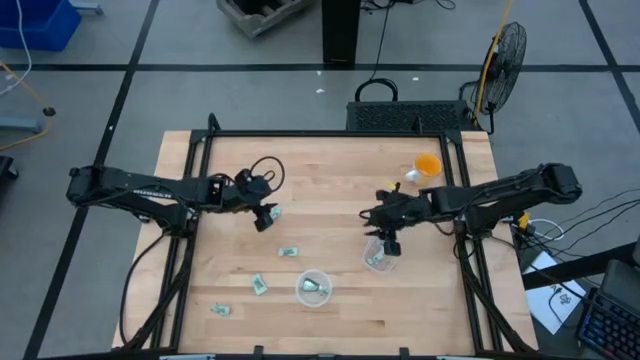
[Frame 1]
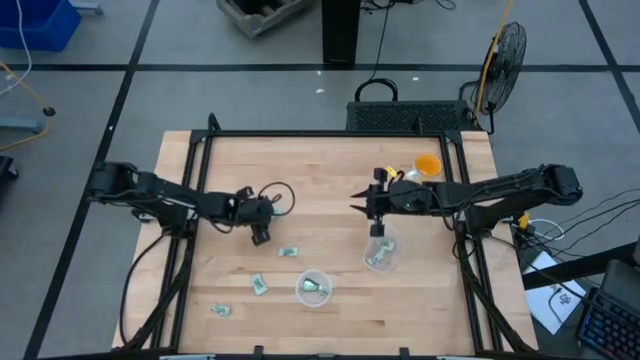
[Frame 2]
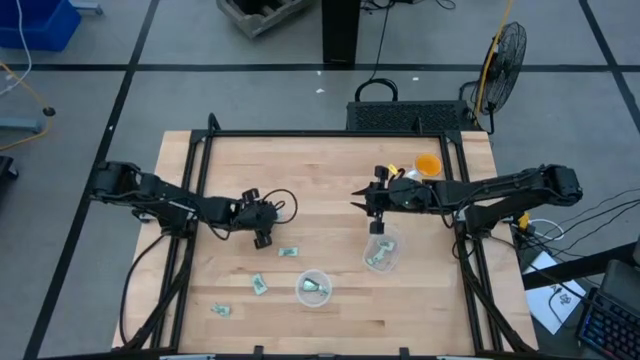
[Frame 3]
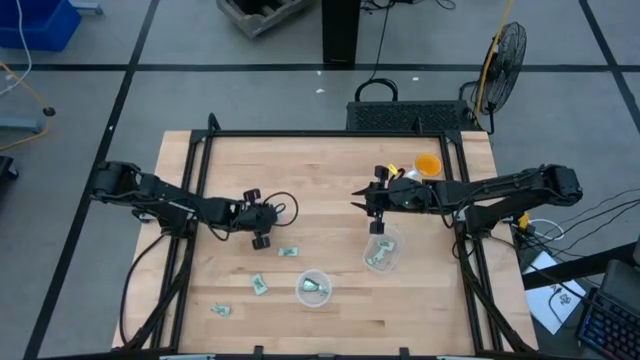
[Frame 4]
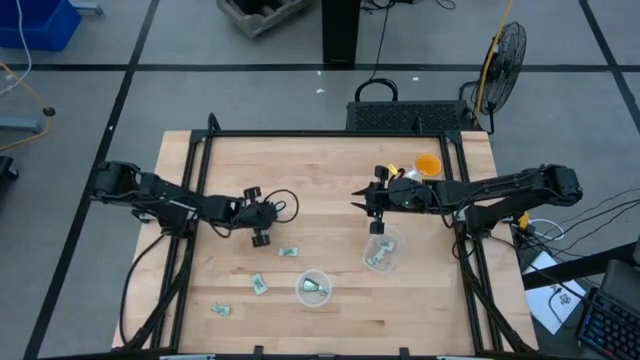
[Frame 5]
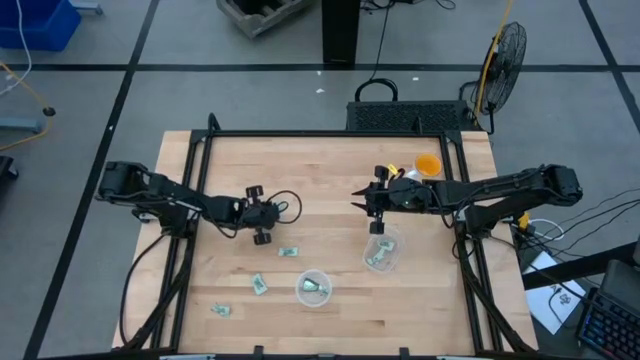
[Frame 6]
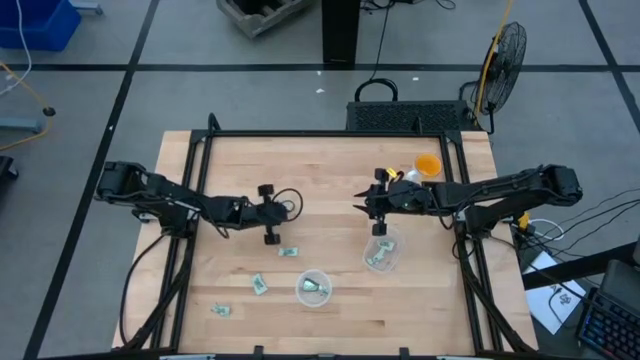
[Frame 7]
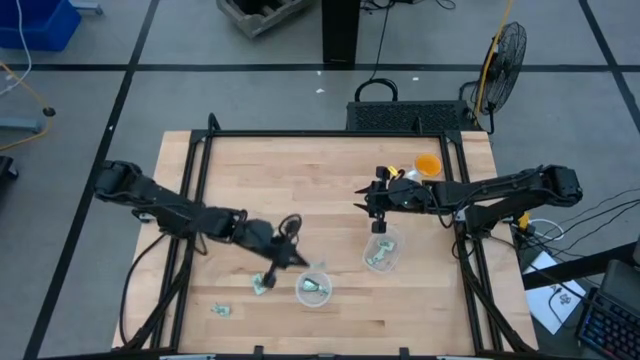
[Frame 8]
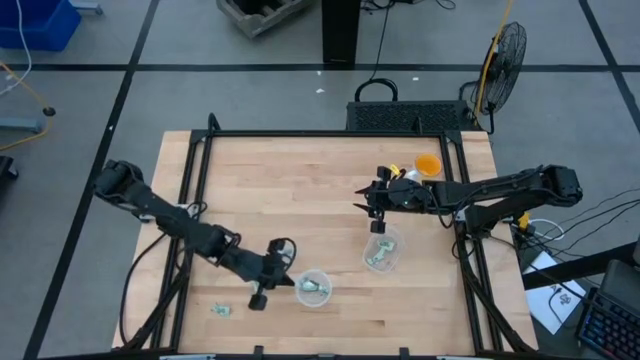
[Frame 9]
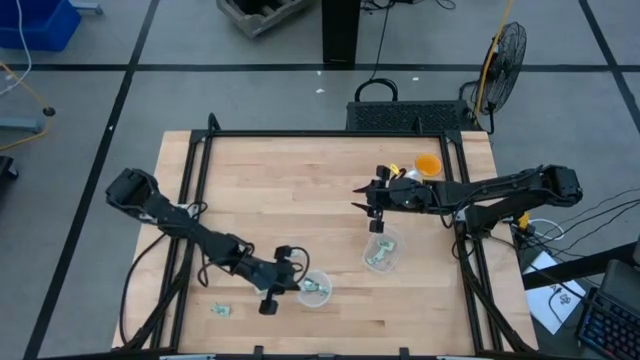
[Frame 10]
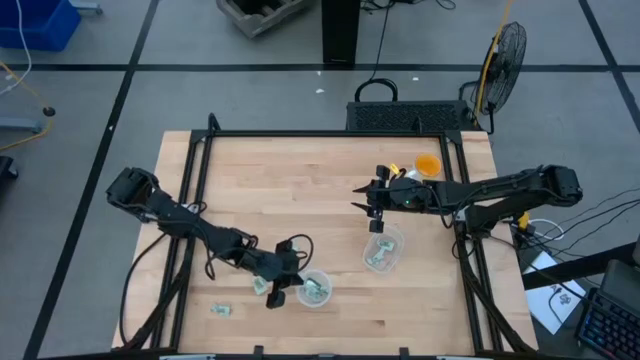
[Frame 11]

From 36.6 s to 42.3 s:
Task: Pick and place items into bin
Put the Stevia packet into the left transparent bin

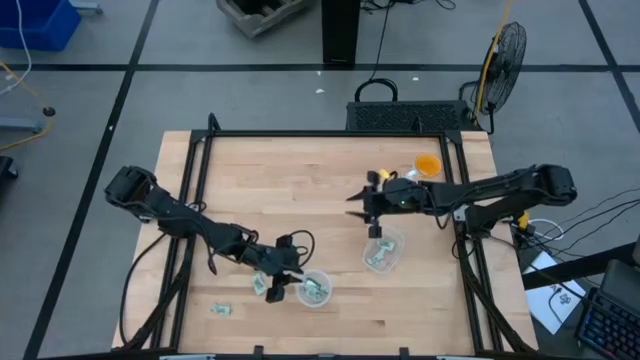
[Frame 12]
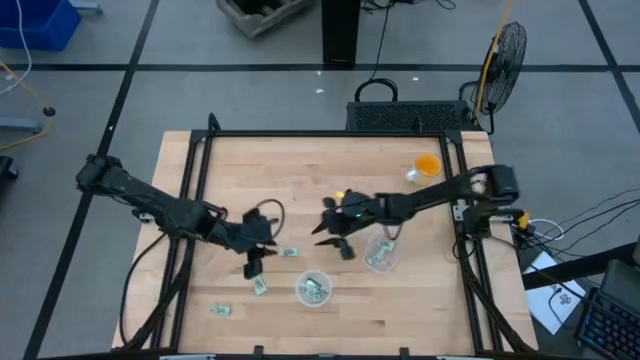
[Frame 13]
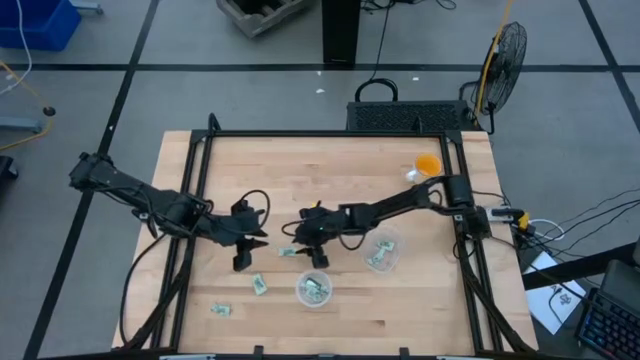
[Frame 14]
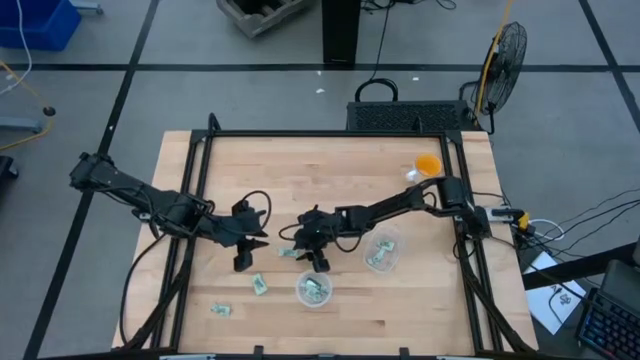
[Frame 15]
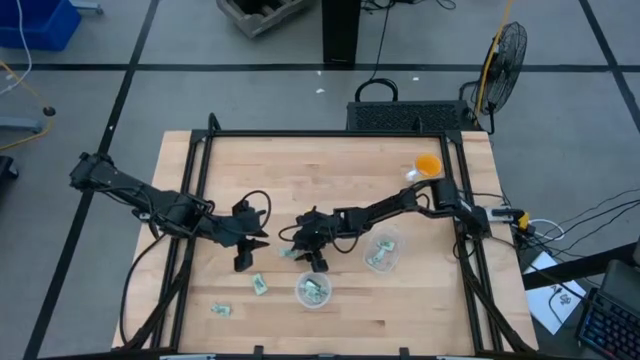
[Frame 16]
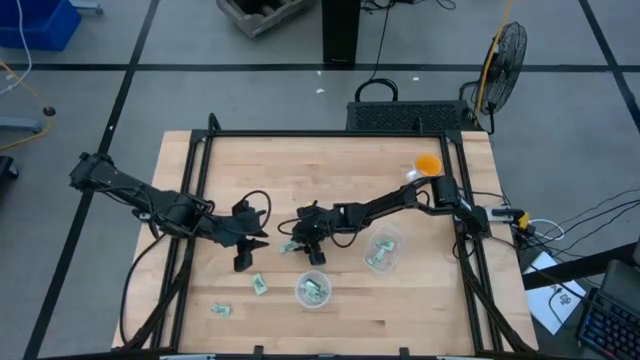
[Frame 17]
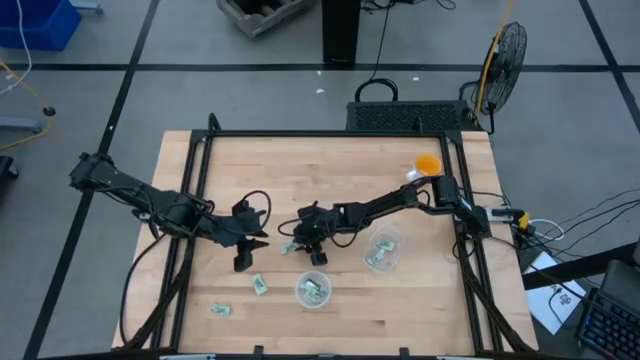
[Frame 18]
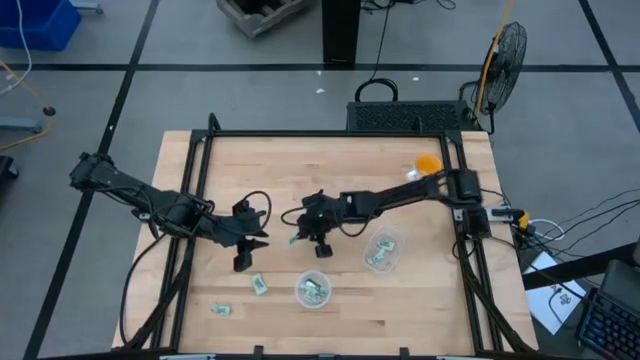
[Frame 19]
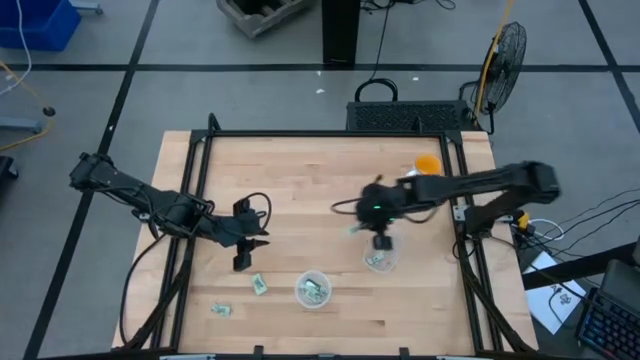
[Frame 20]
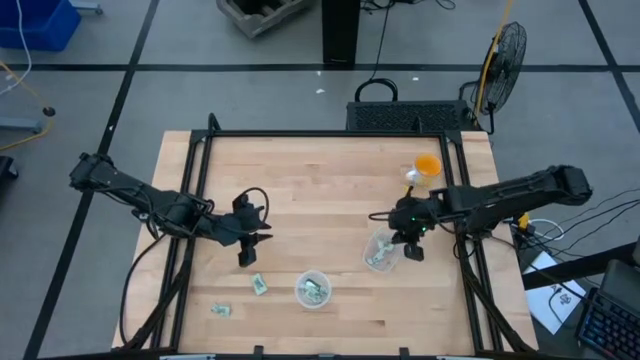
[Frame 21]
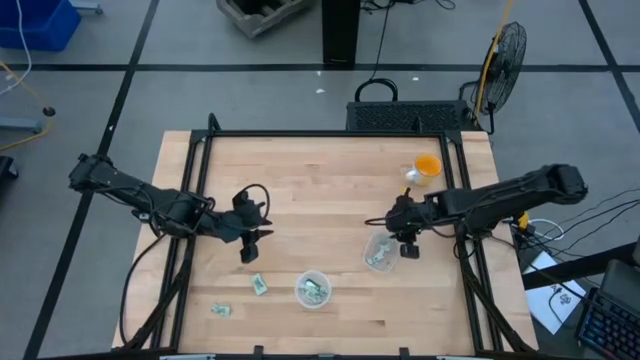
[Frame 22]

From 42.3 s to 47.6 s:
Put the Stevia packet into the right transparent bin

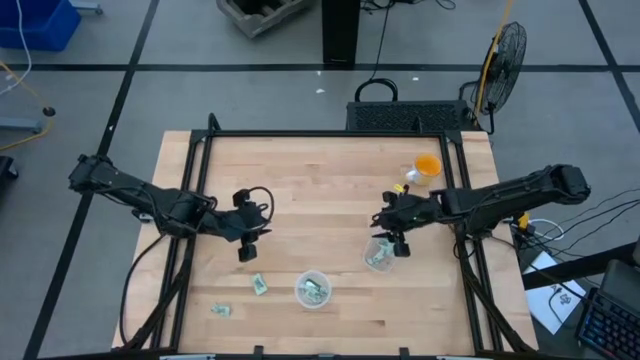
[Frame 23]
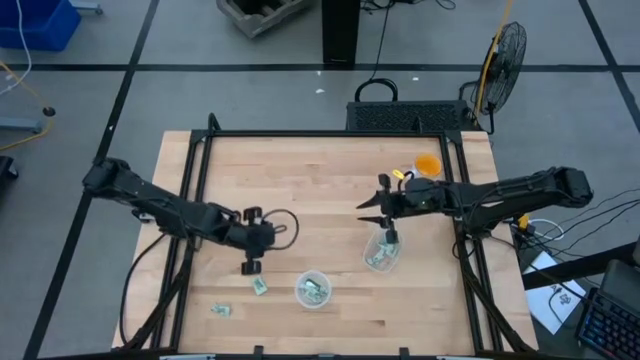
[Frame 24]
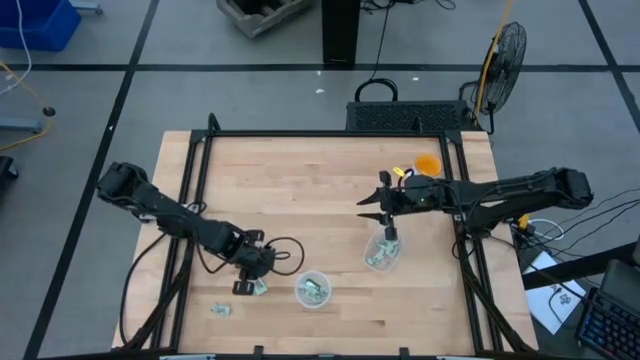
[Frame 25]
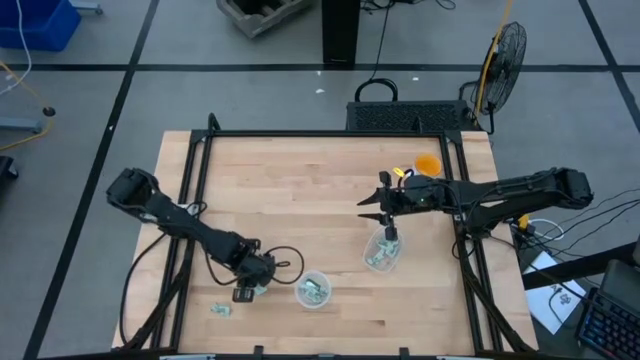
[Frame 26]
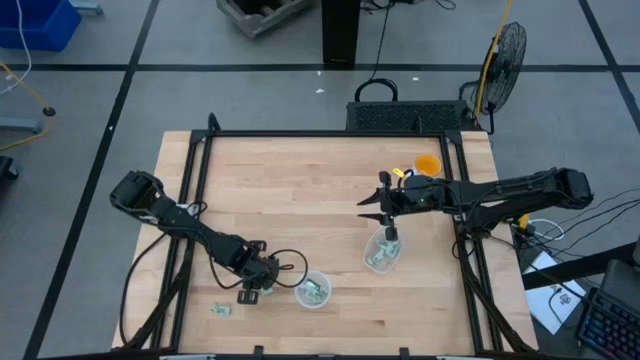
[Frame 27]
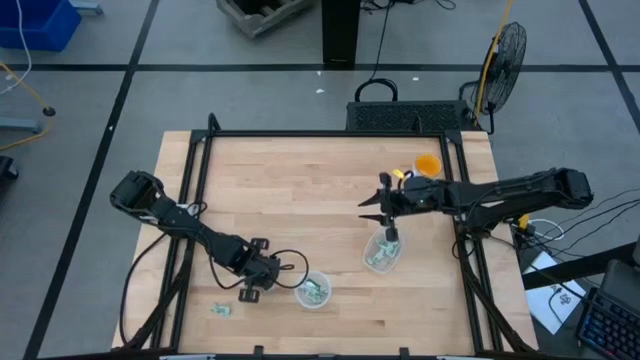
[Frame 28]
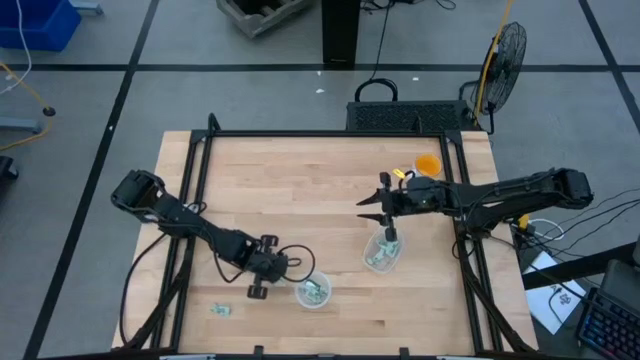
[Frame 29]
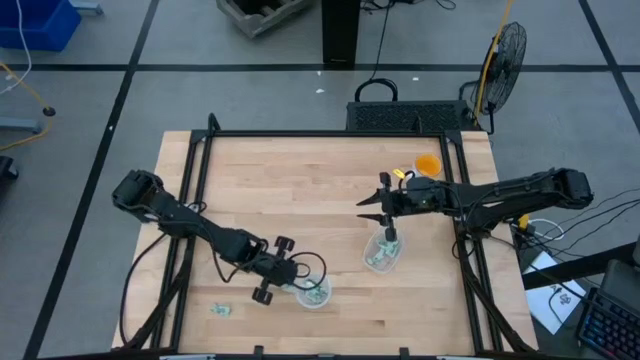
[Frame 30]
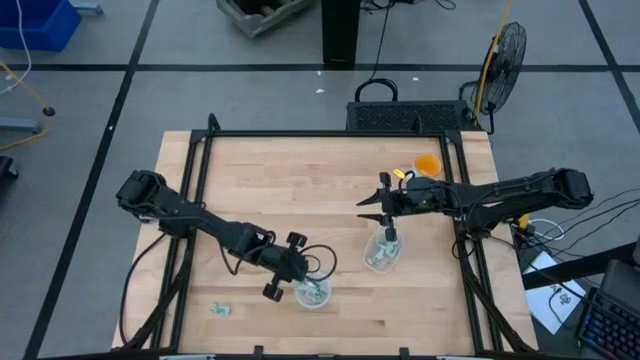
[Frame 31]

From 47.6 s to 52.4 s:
Put the Stevia packet into the left transparent bin

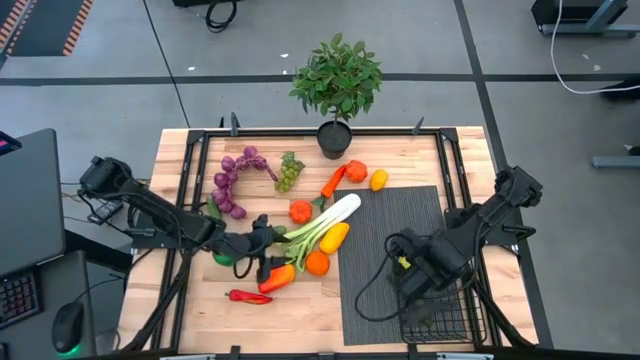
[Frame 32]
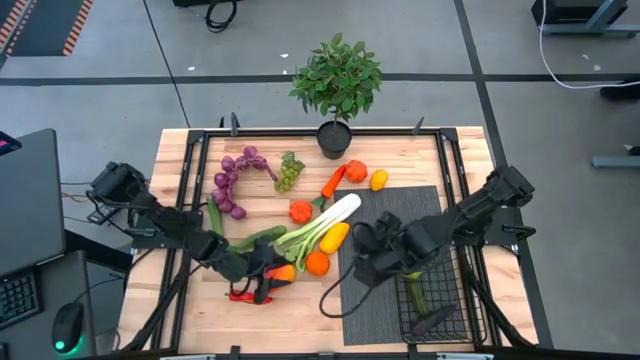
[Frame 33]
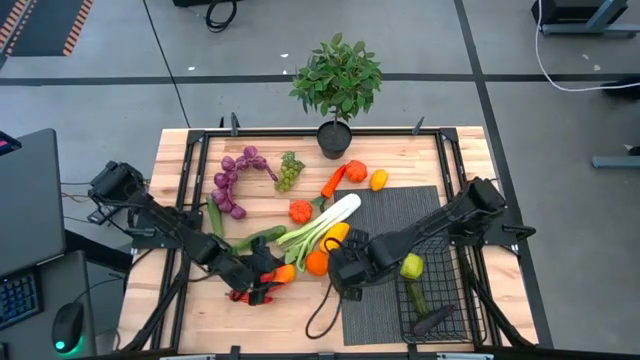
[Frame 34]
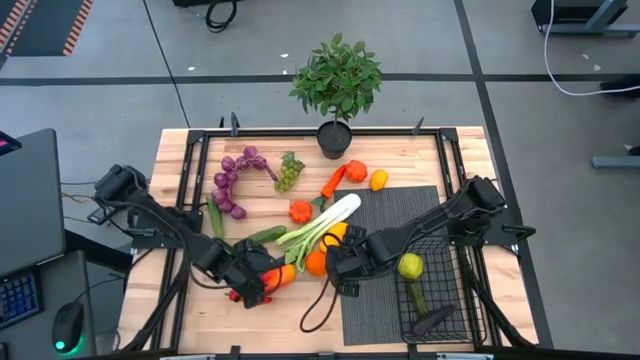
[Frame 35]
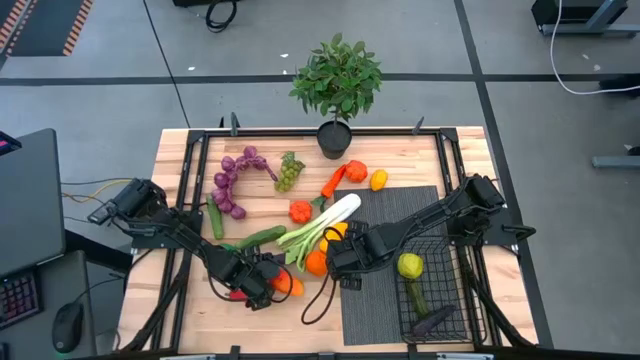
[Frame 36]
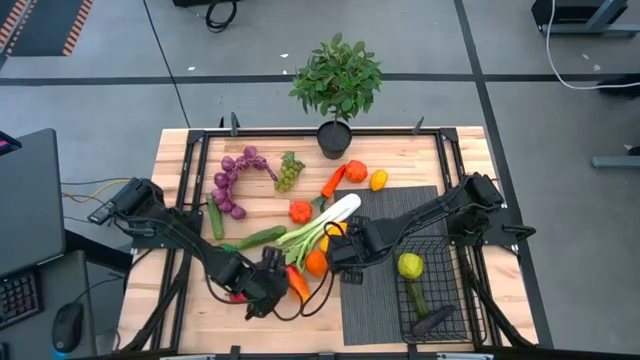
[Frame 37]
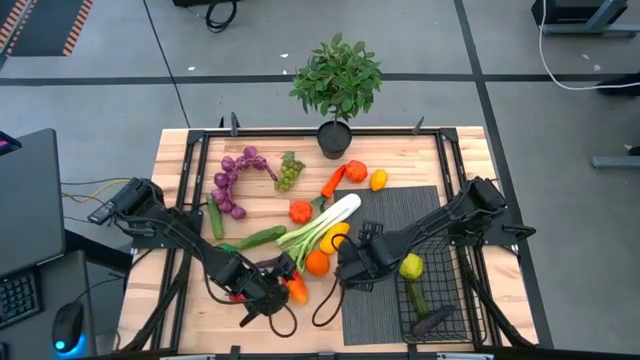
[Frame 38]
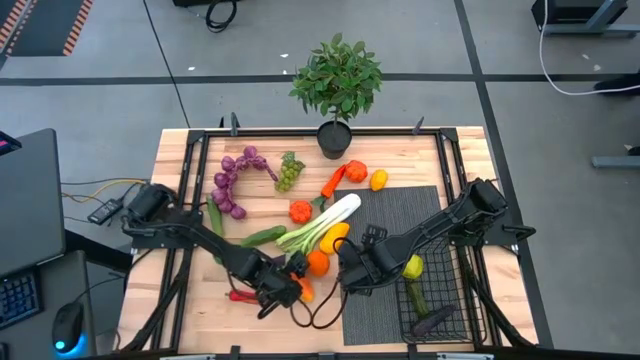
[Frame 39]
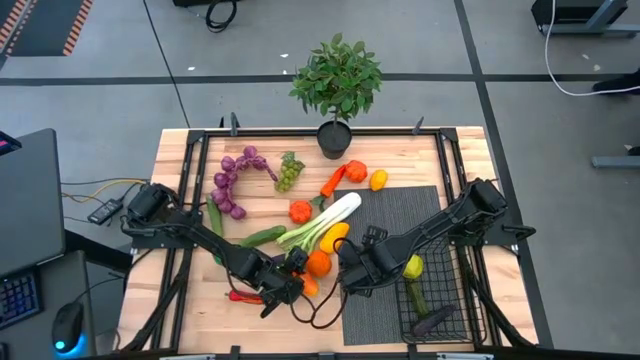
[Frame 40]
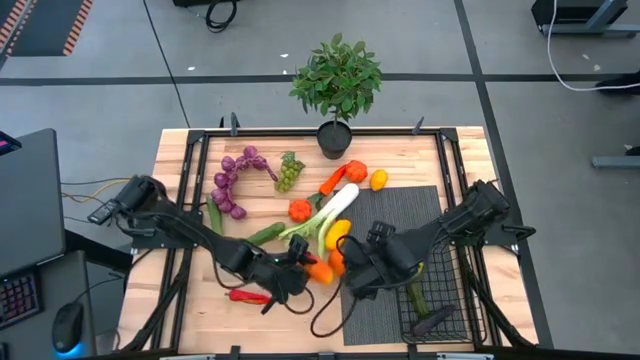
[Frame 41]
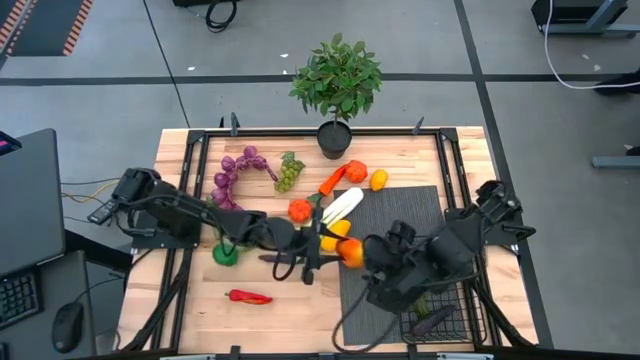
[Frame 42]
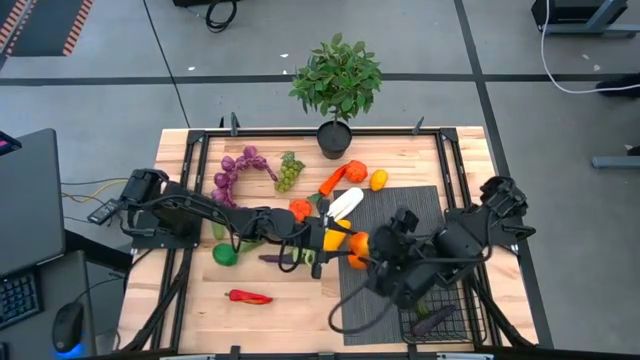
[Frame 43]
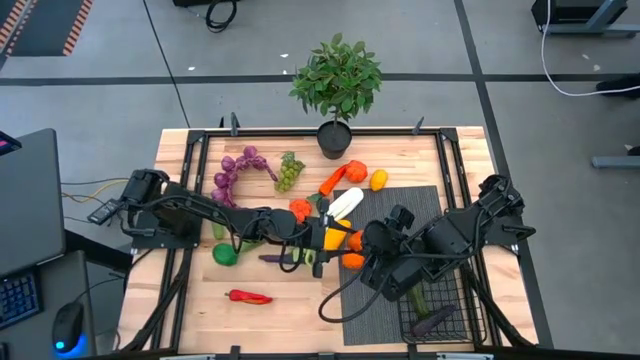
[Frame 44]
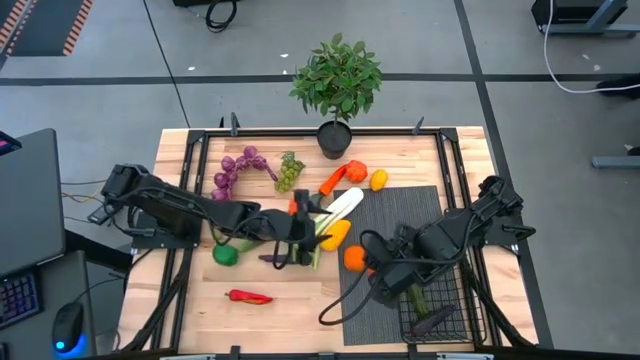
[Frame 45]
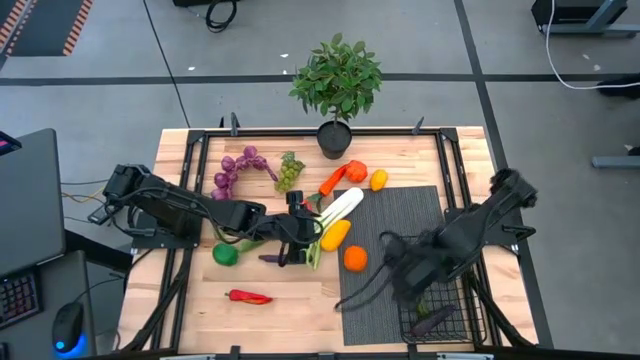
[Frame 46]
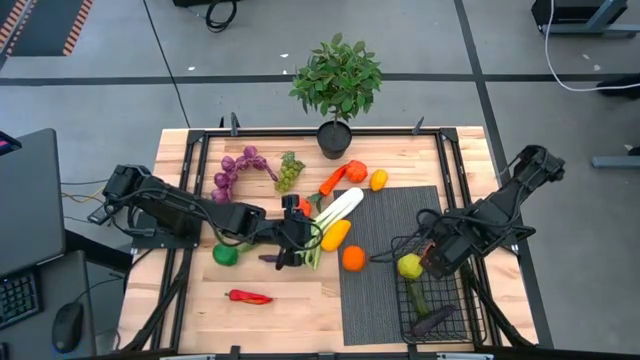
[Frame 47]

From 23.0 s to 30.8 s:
Task: Build produce basket
Put the bottom mango into the black wire basket
